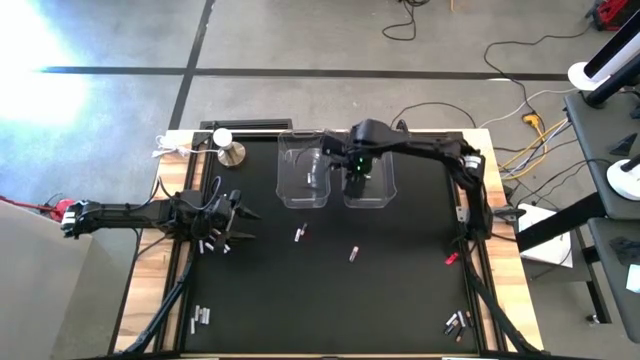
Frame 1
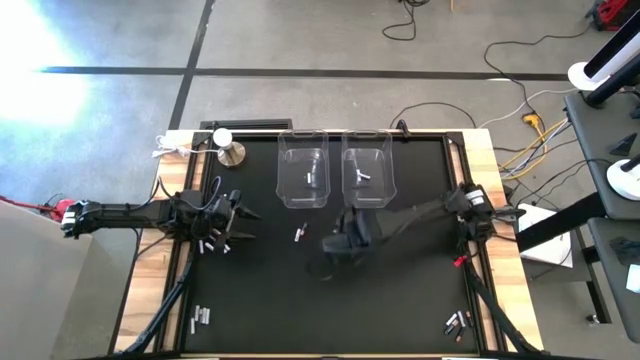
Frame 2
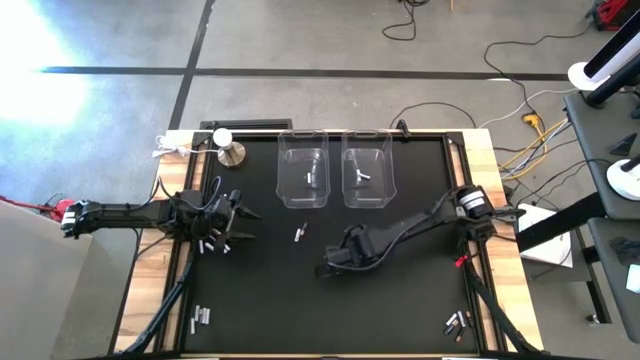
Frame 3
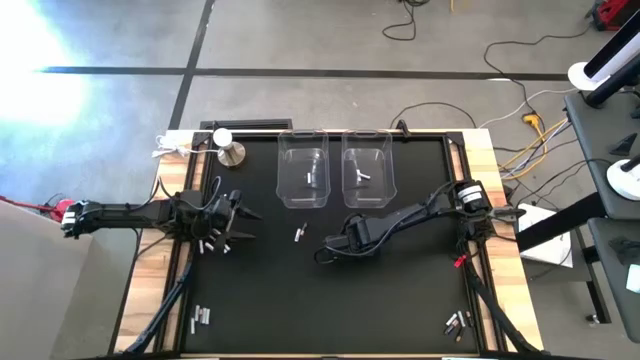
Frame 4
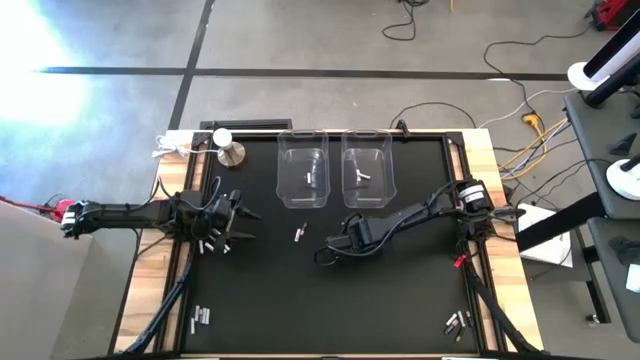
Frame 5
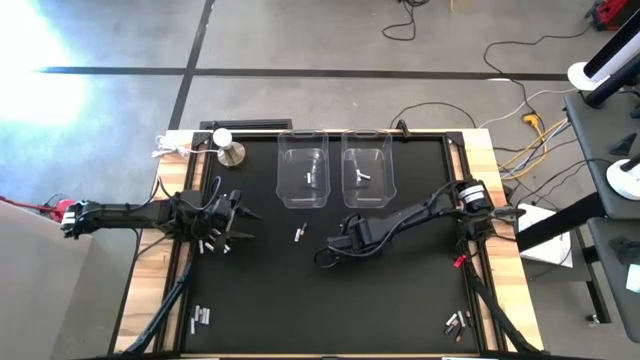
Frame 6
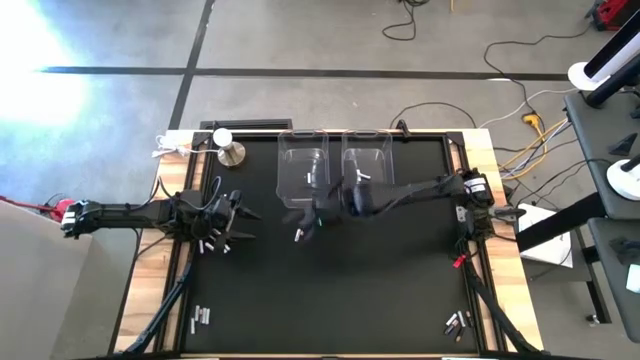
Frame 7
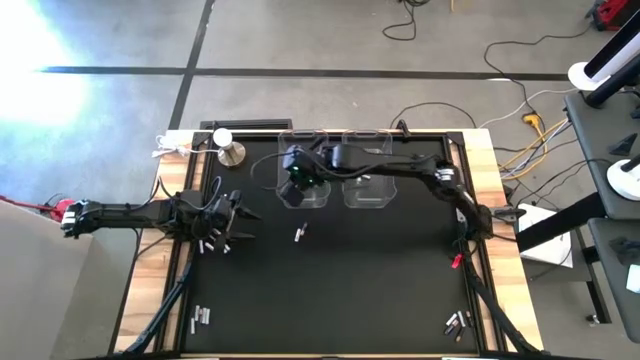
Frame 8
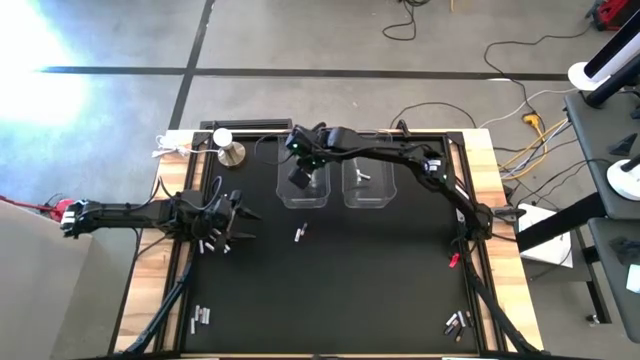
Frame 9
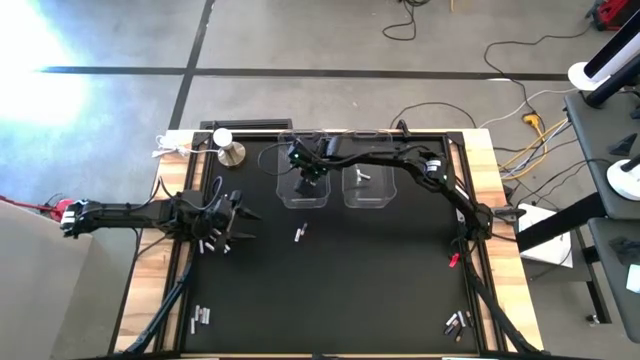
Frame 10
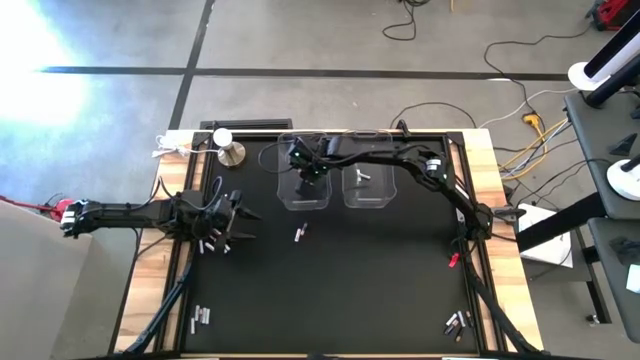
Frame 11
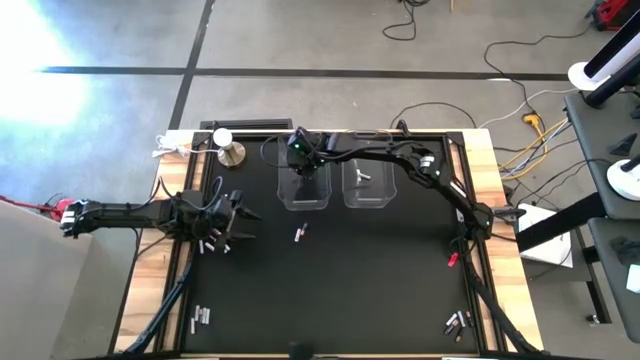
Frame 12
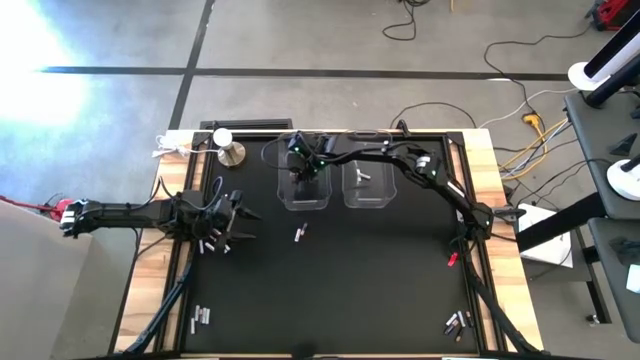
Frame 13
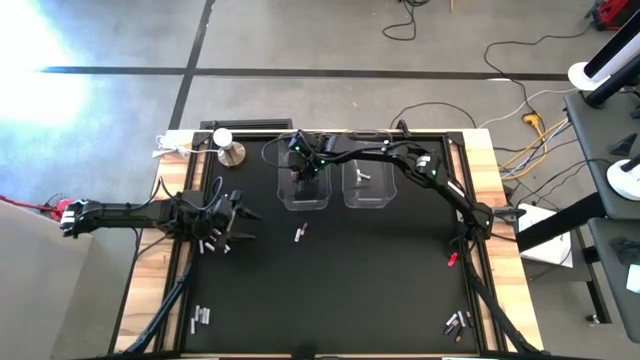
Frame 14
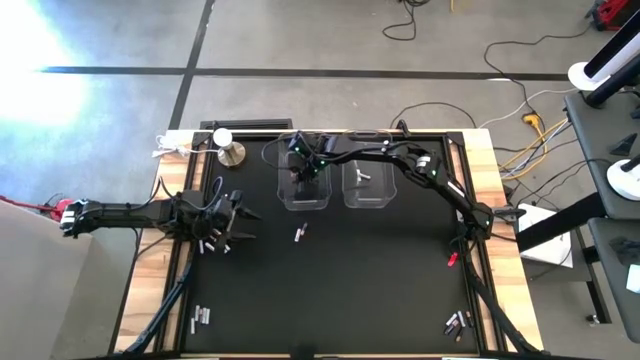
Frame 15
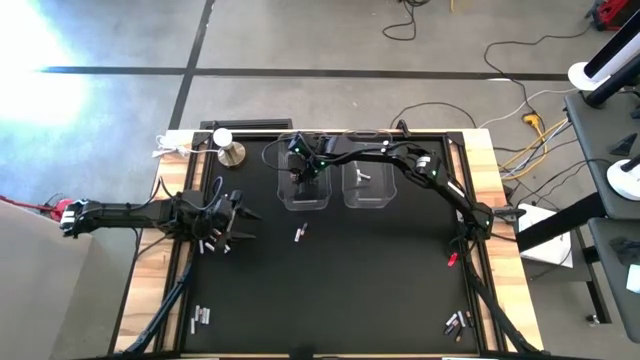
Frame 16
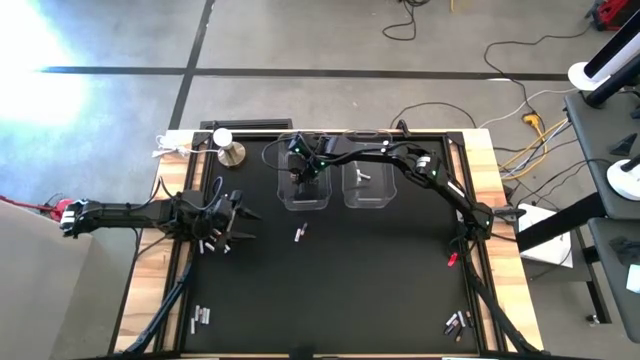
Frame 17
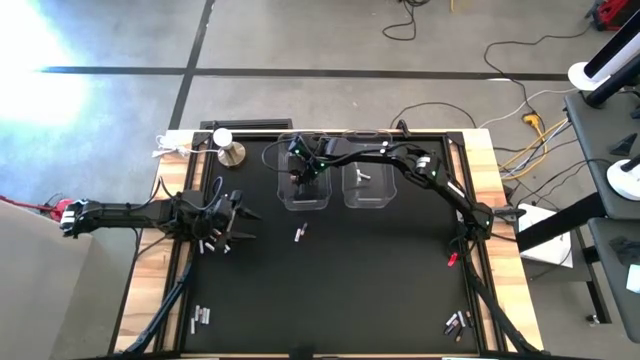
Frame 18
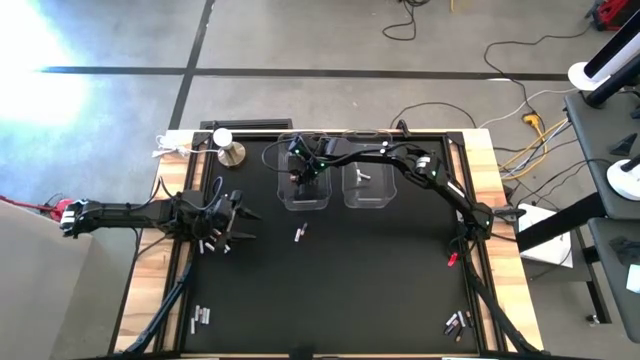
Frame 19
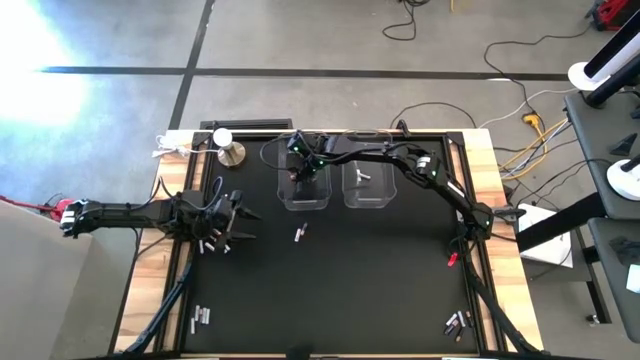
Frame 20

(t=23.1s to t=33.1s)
Task: Sort batteries
Put the black battery into the left transparent bin

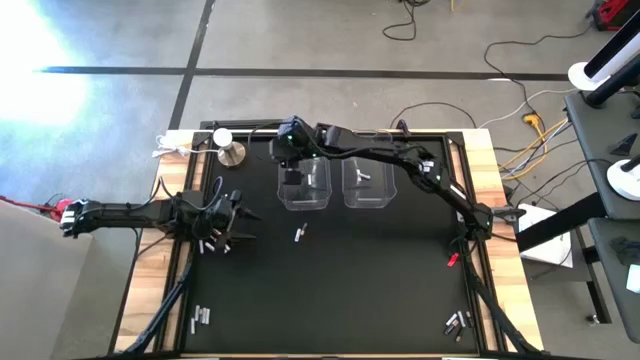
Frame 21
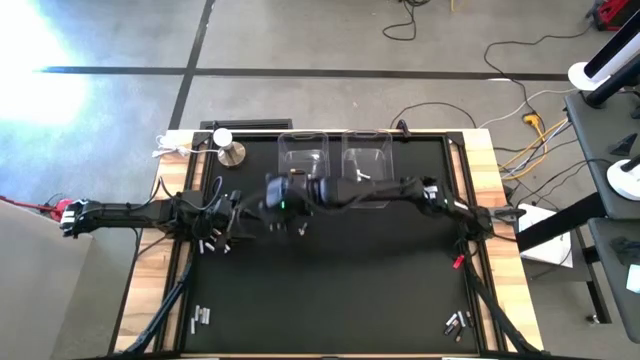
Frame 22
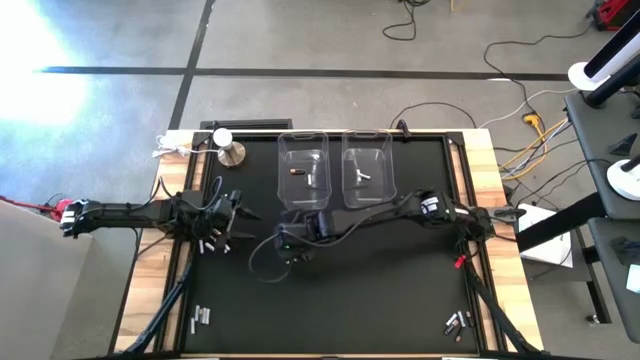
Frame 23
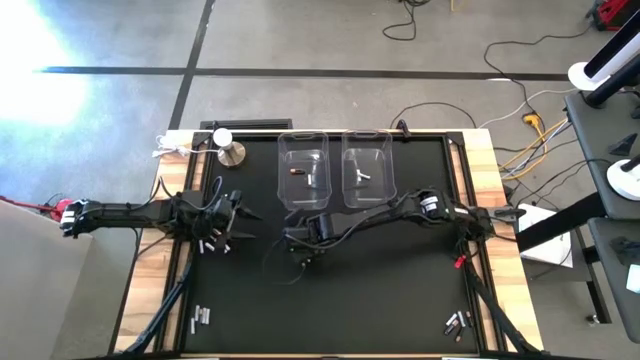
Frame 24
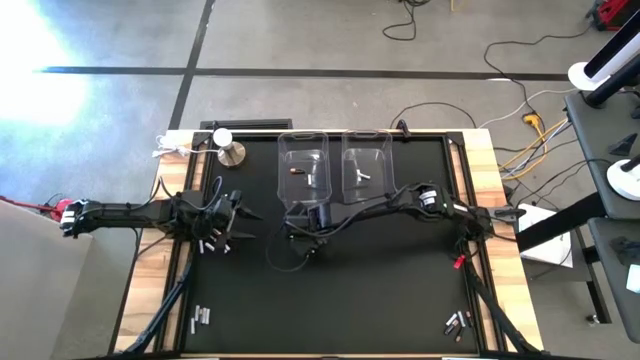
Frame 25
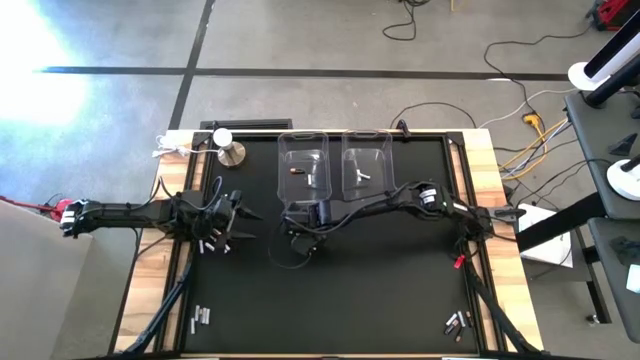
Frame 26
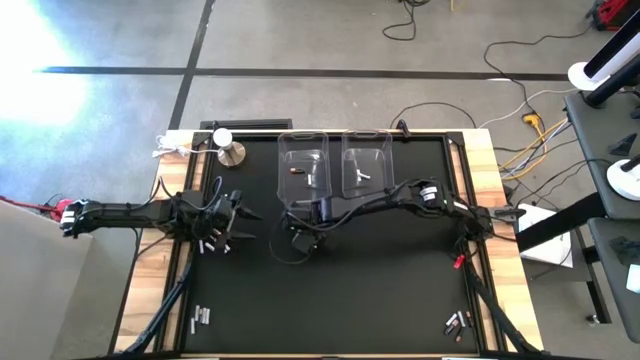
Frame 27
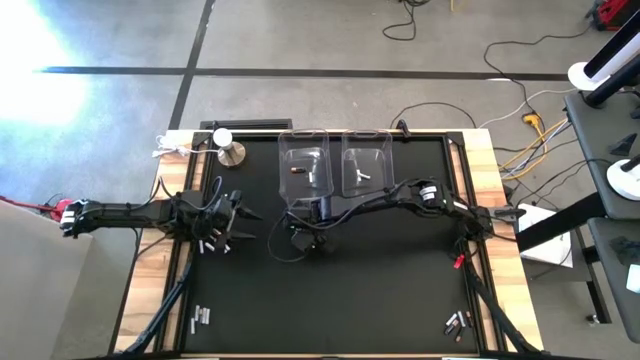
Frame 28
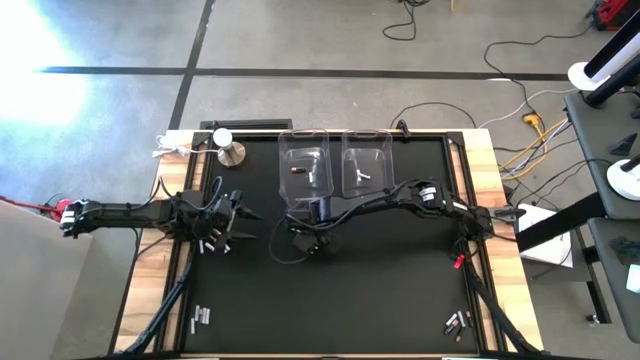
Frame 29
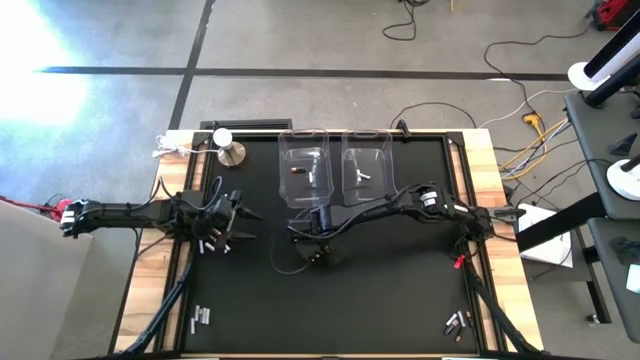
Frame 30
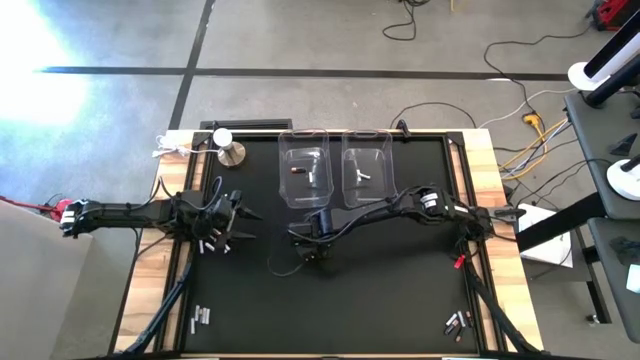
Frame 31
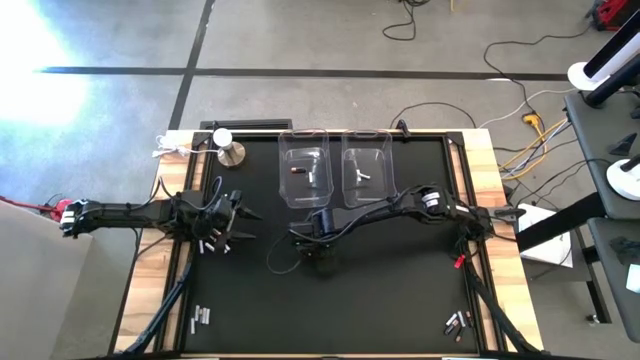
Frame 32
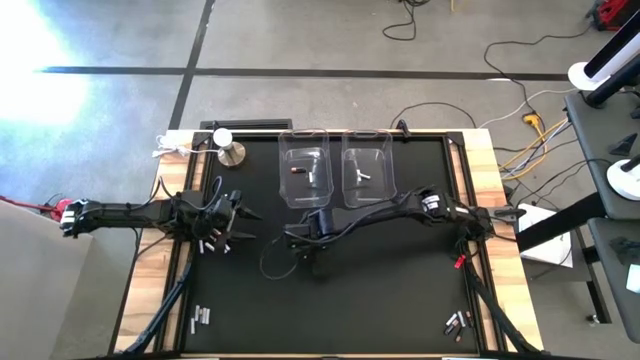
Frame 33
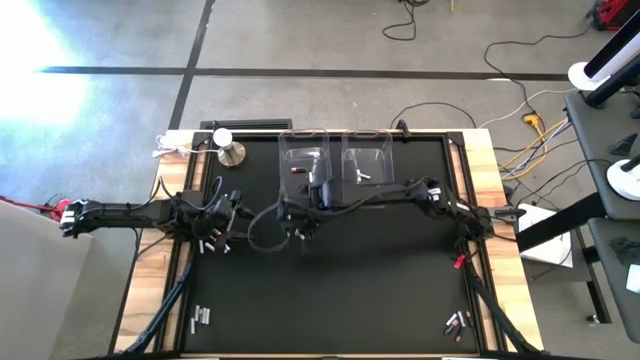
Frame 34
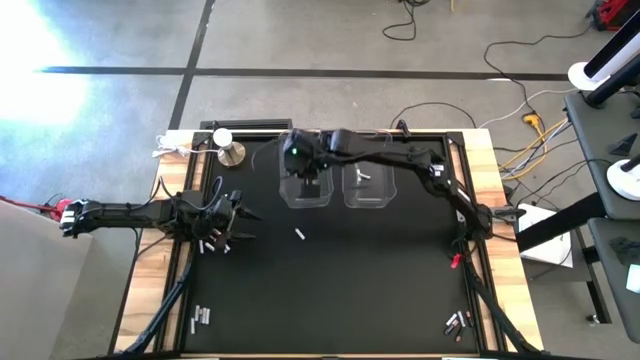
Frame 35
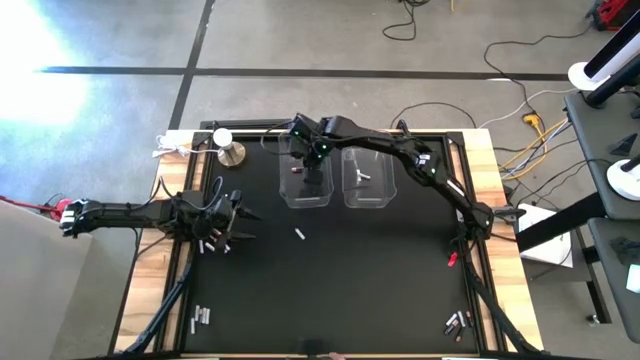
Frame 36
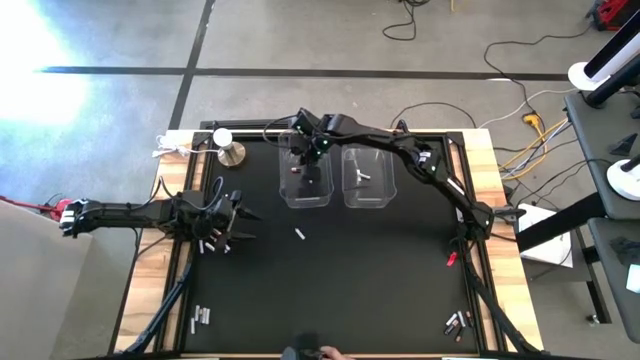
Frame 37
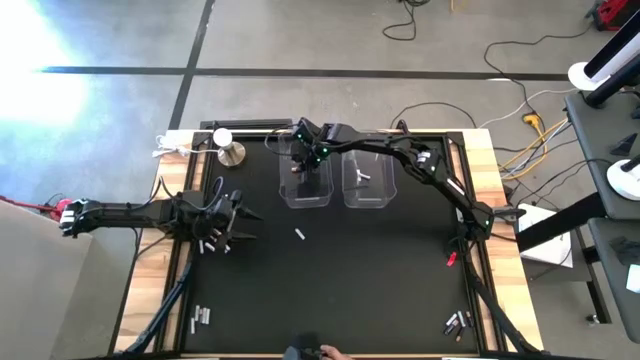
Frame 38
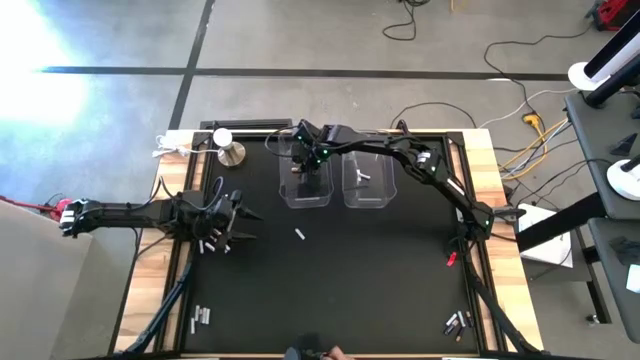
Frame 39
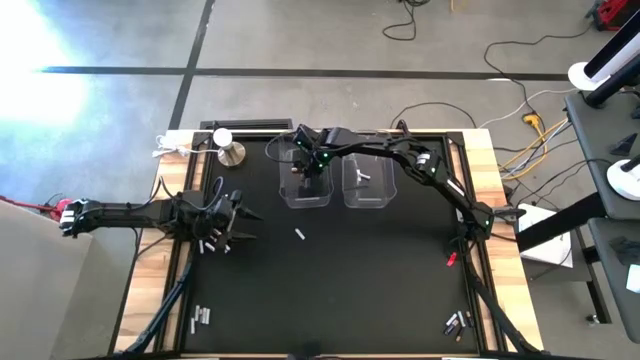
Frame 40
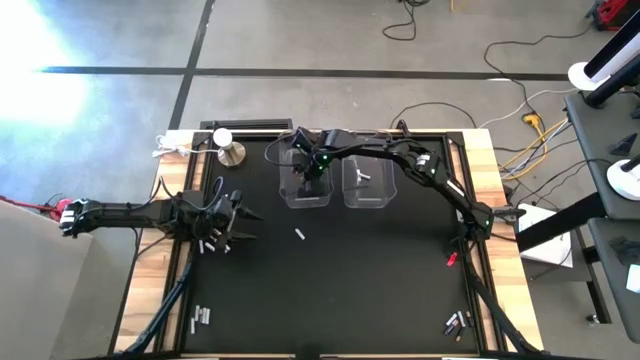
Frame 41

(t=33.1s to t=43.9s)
Put the black battery into the left transparent bin

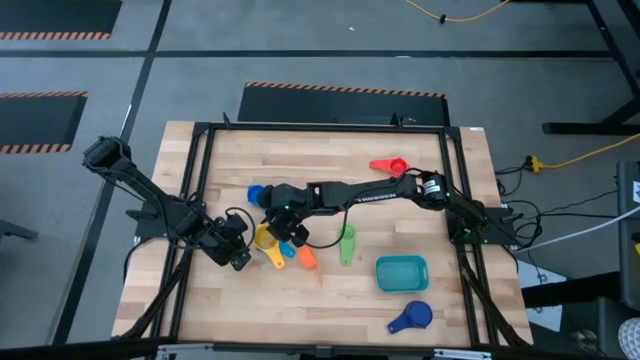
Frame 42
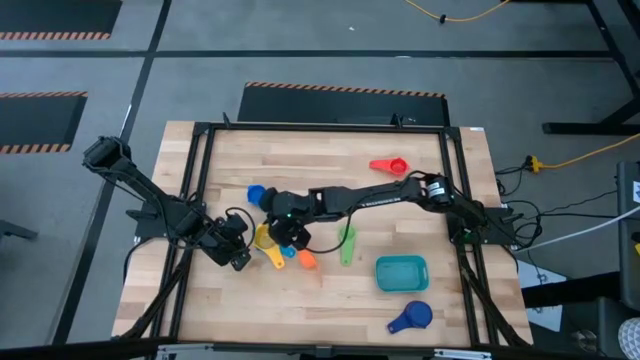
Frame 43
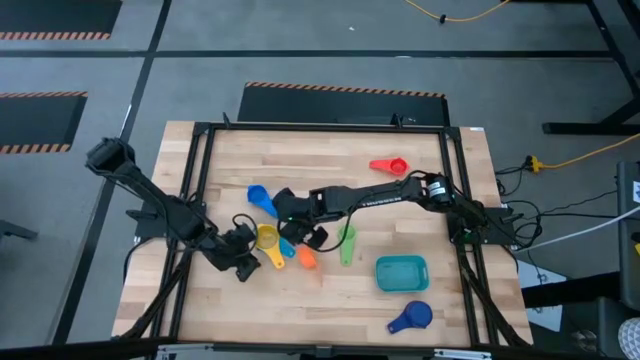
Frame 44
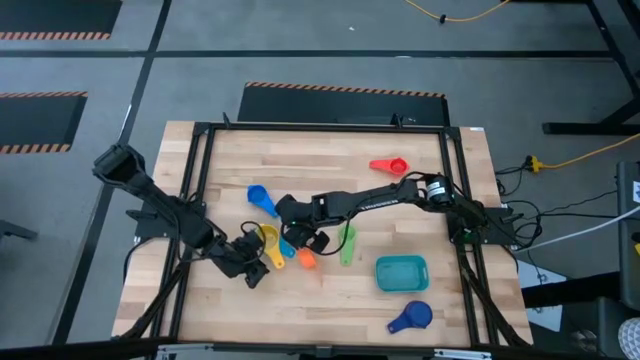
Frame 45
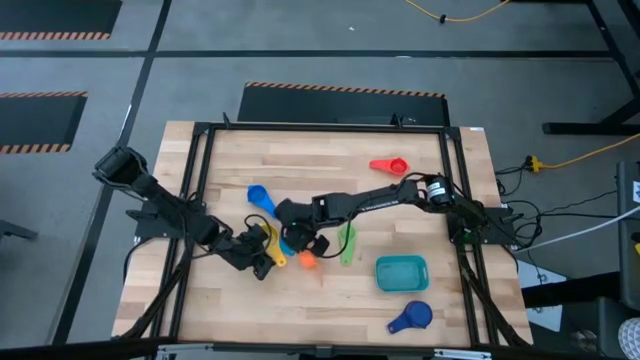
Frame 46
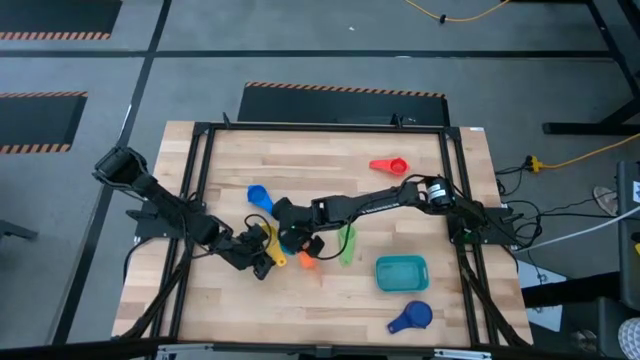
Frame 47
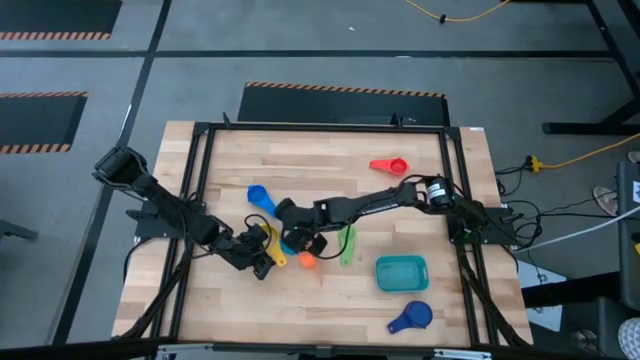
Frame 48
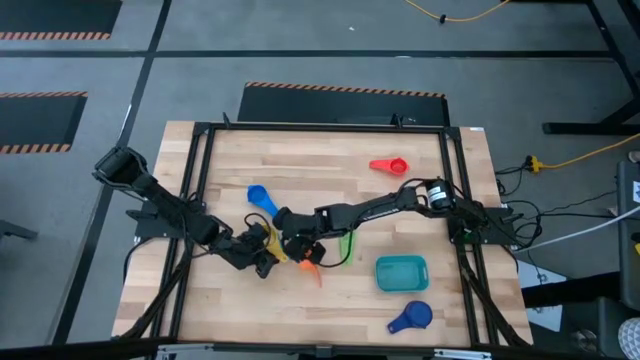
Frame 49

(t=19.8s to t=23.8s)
Task: Nest measuring cups in basket
Adjust the yellow measuring nest cup
